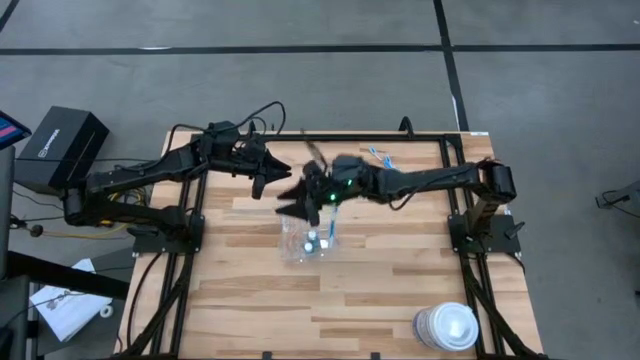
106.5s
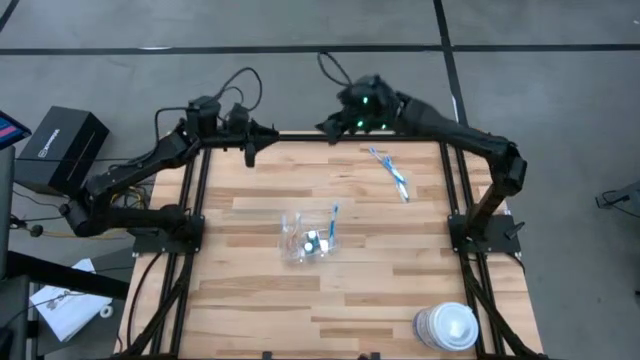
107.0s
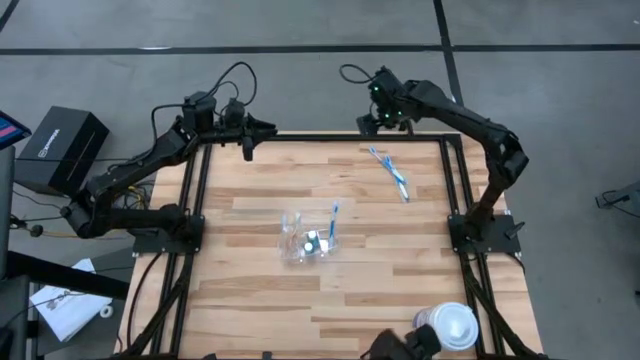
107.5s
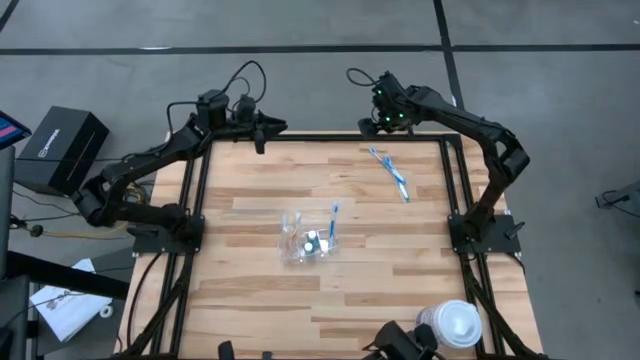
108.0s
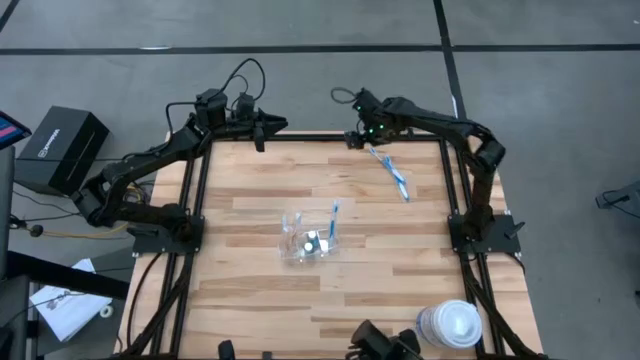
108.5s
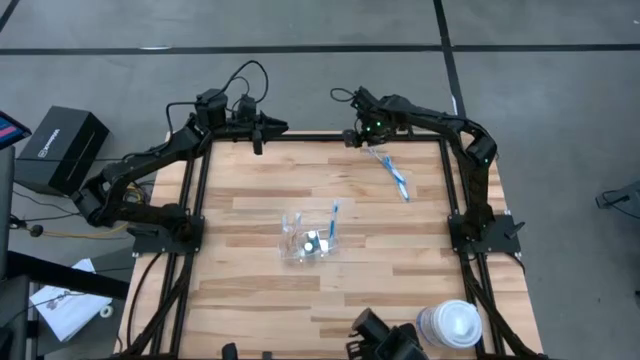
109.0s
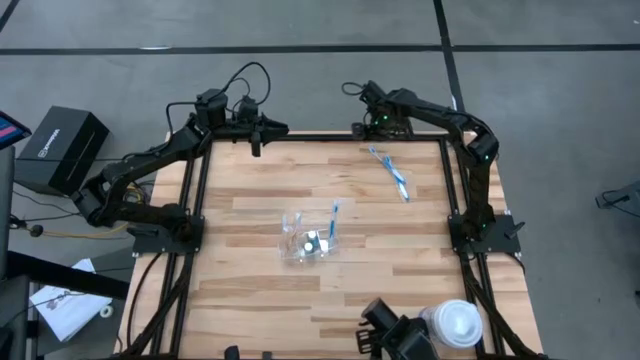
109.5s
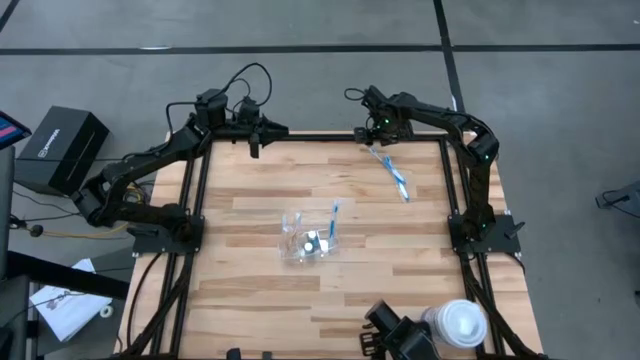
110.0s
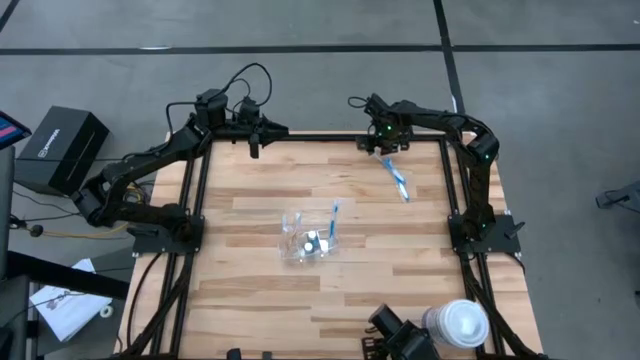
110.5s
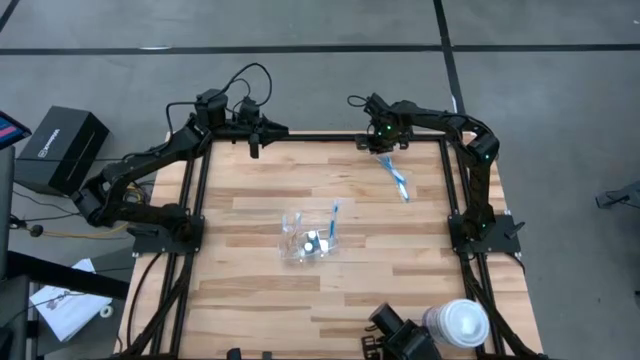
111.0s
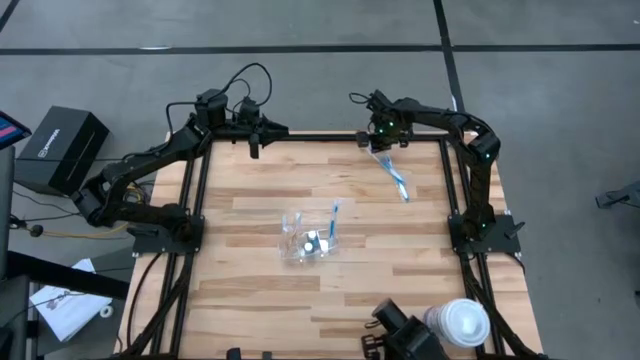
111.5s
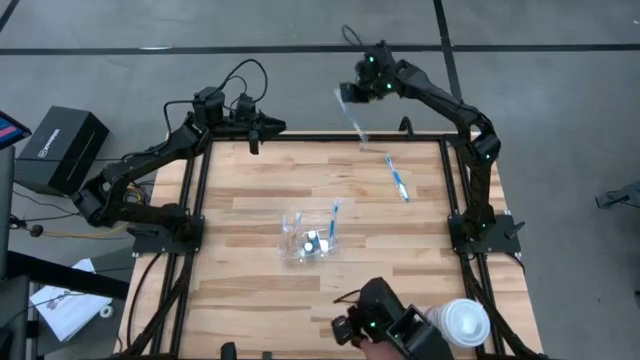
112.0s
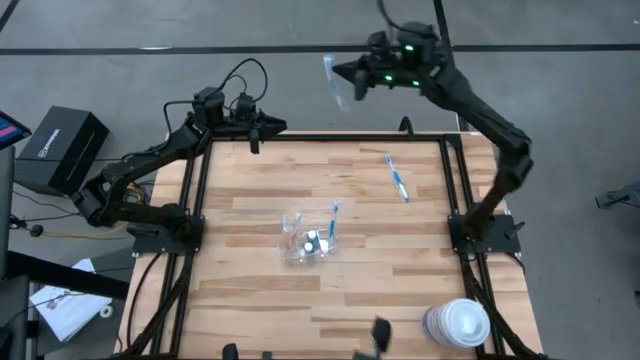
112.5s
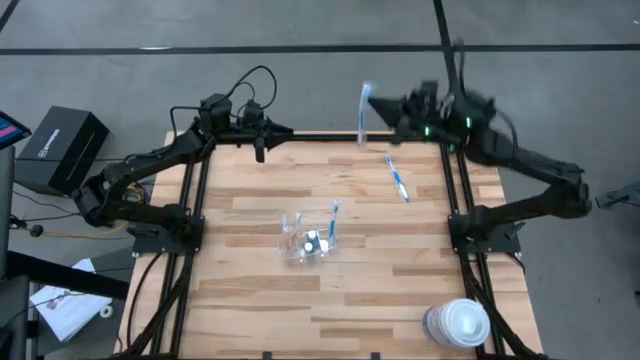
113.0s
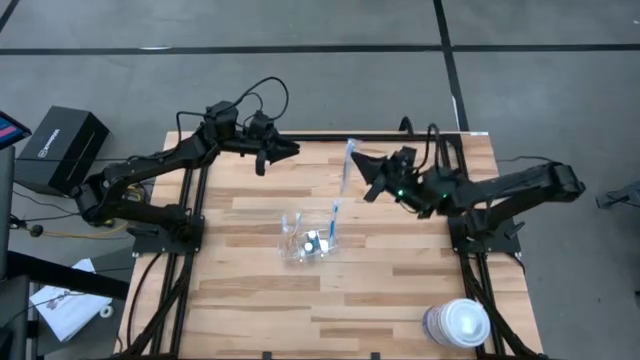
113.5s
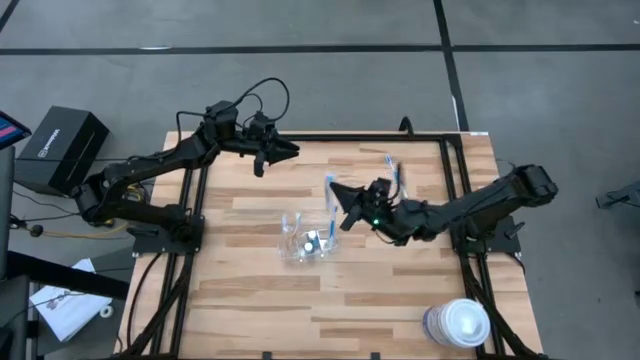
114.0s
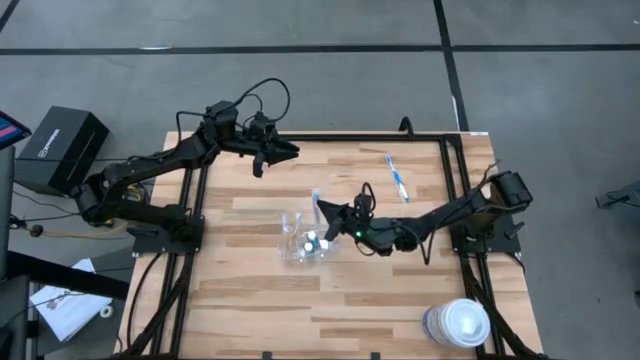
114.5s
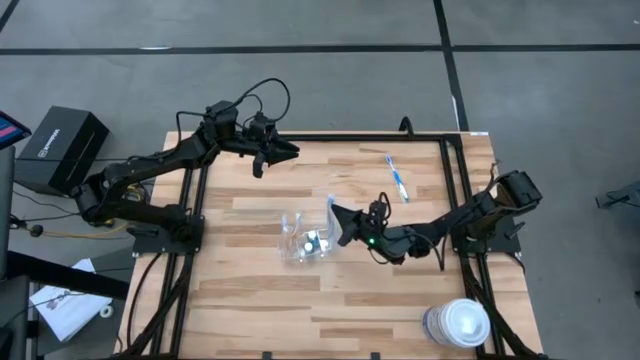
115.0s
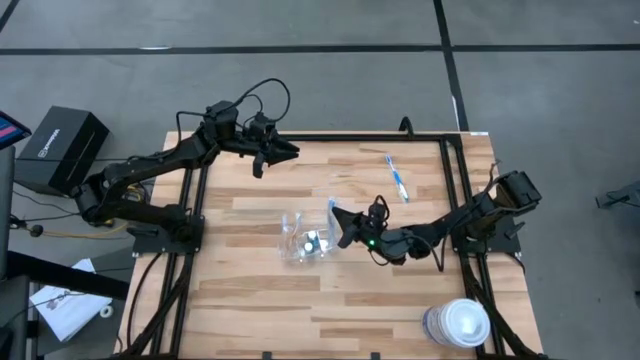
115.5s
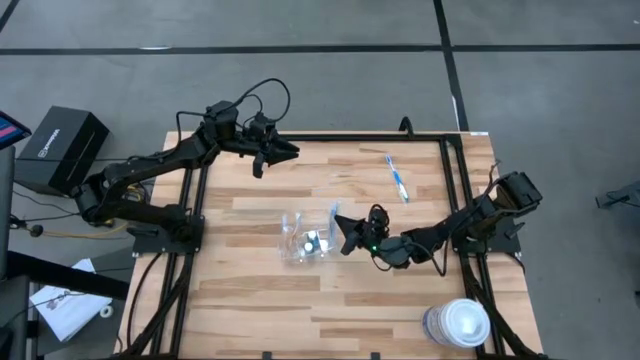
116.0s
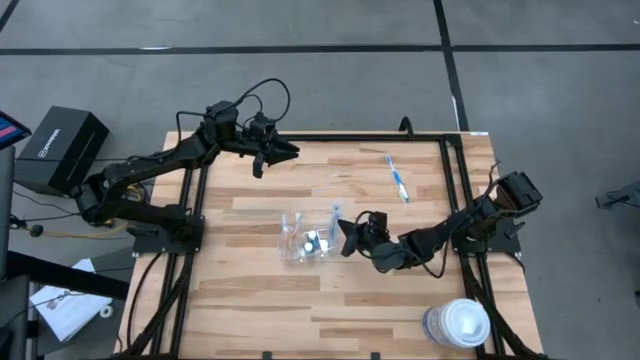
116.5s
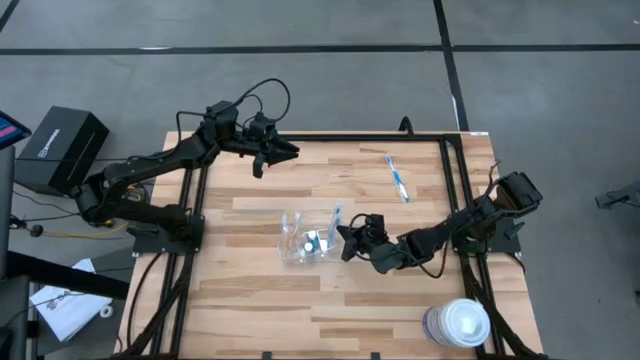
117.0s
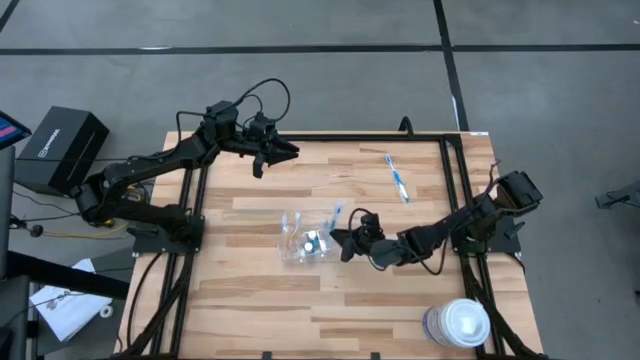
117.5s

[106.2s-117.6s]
Task: Pick & Place toothbrushing station
Put the left blue toothbrush into the transparent organizer

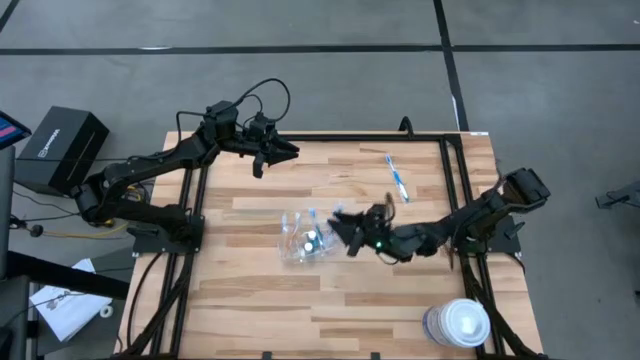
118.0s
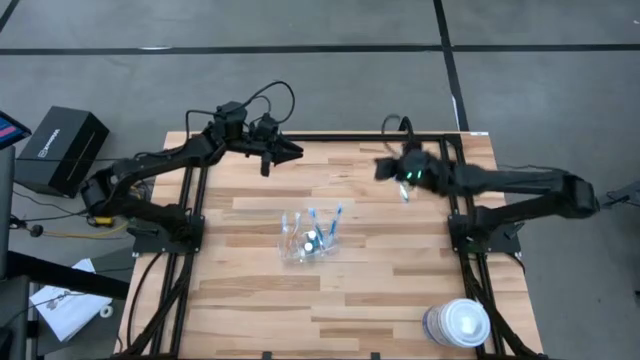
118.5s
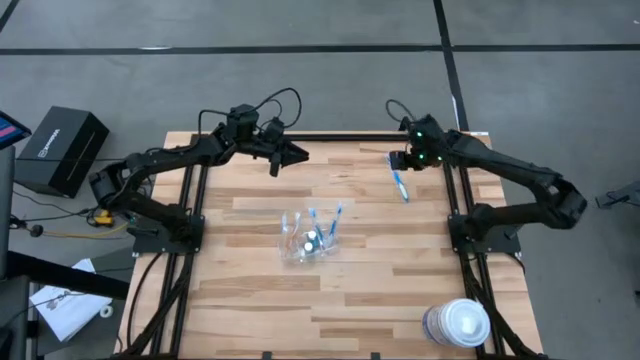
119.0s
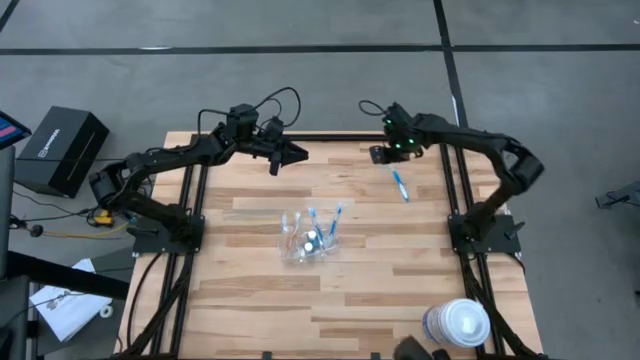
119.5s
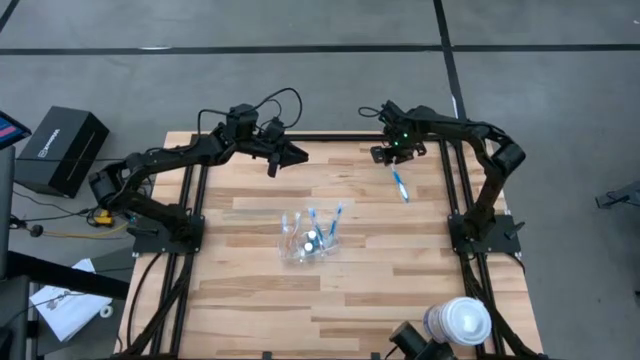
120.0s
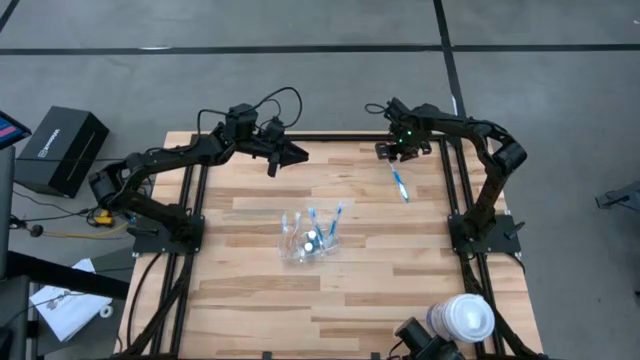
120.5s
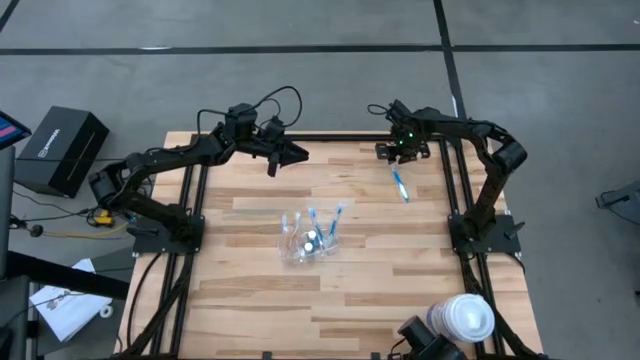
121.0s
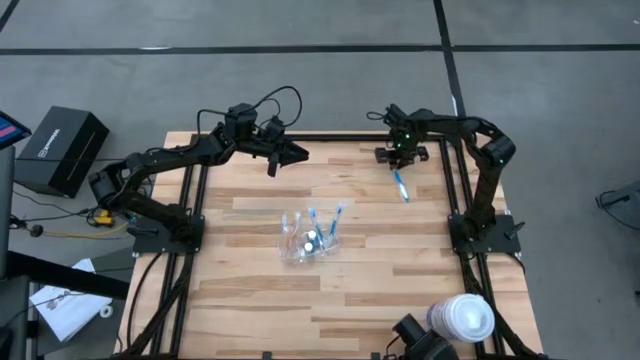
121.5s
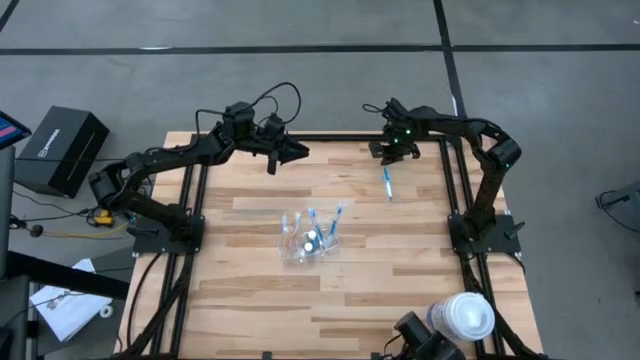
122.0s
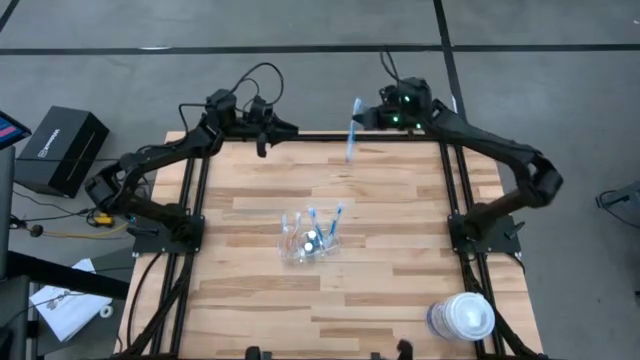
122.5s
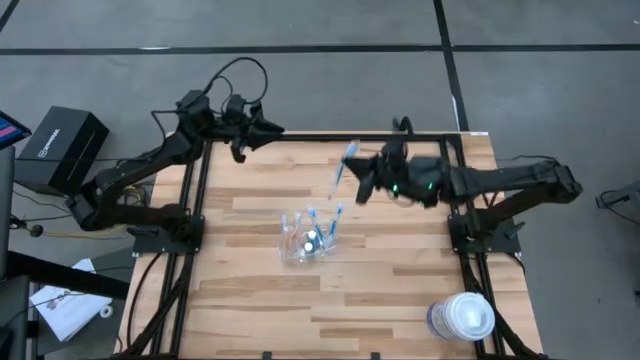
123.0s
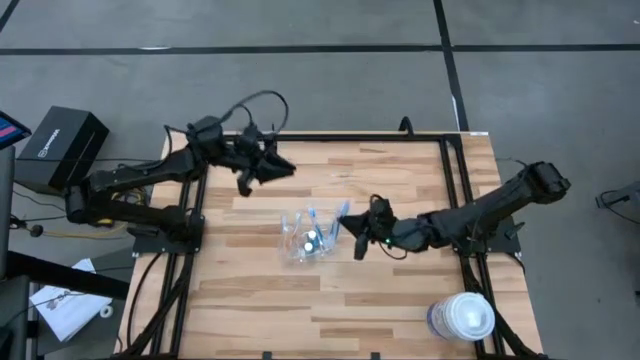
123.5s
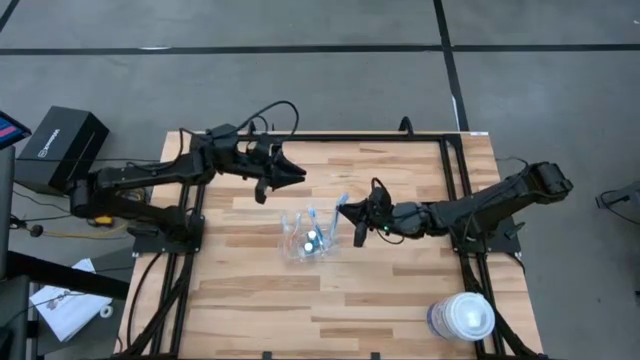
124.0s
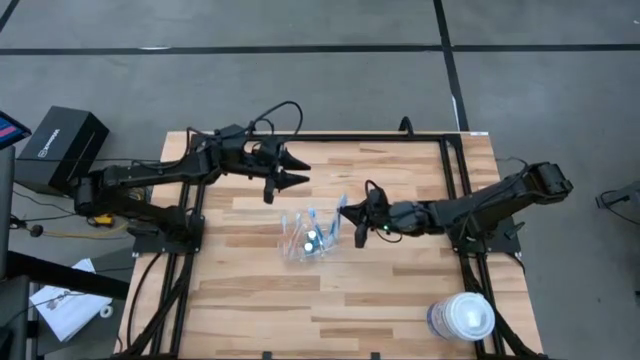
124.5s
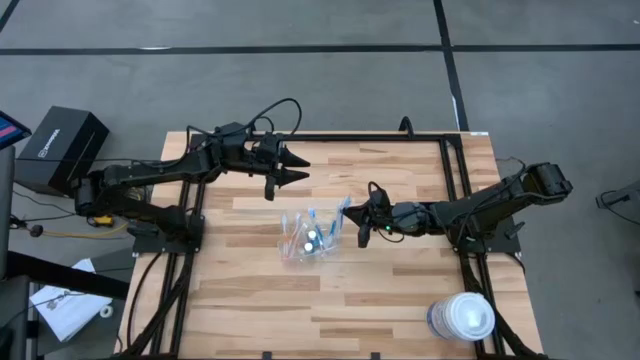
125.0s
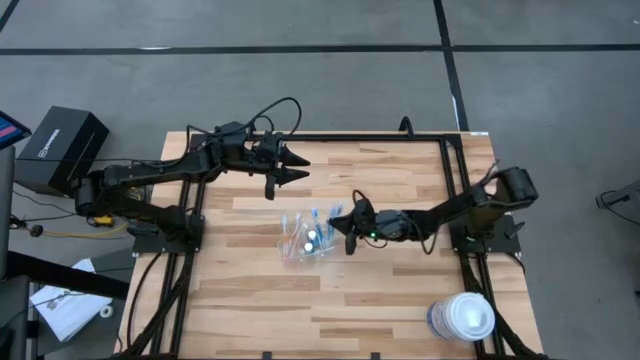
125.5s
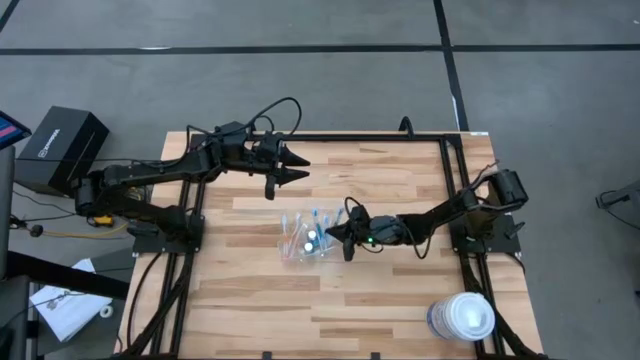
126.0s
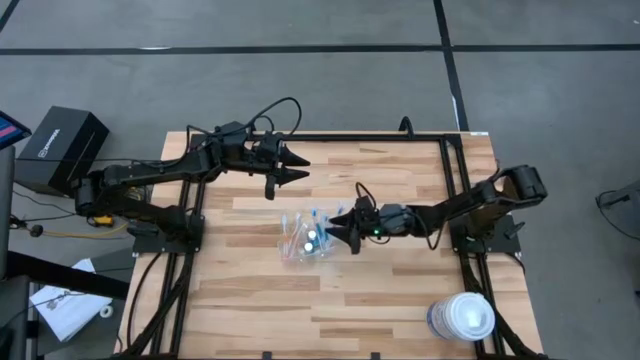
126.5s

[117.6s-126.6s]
Put the blue toothbrush into the transparent organizer

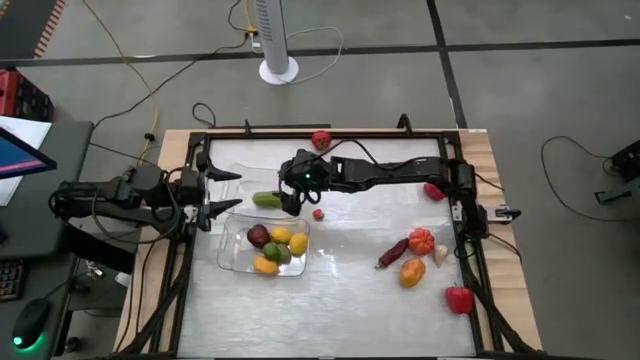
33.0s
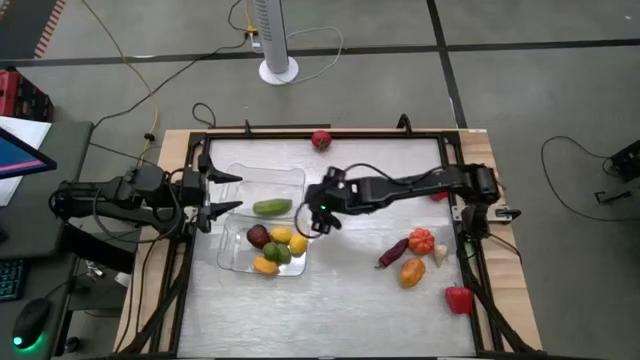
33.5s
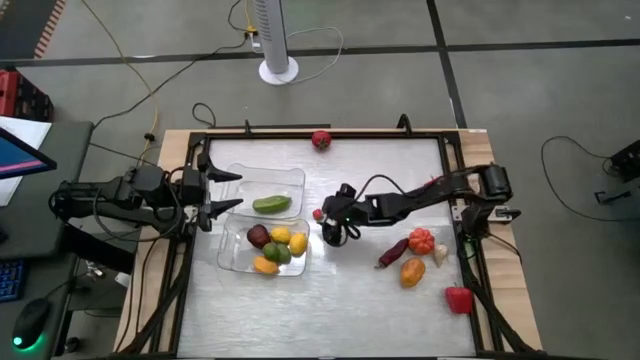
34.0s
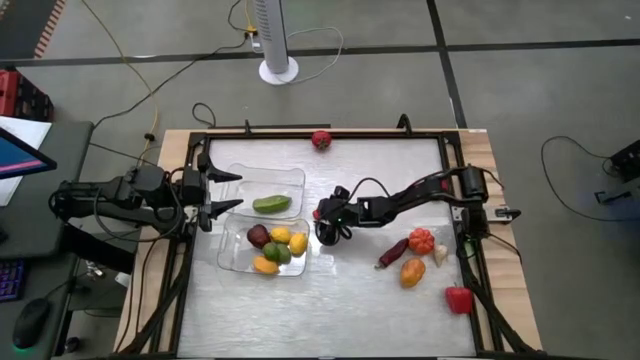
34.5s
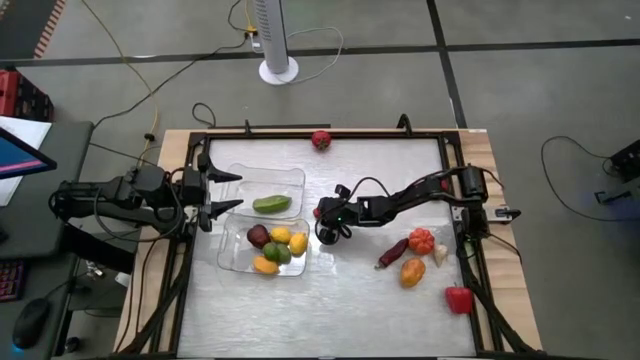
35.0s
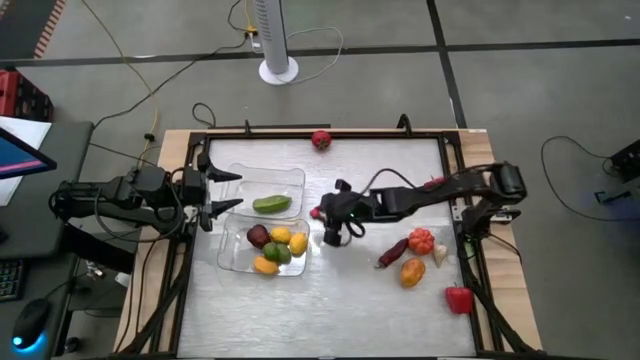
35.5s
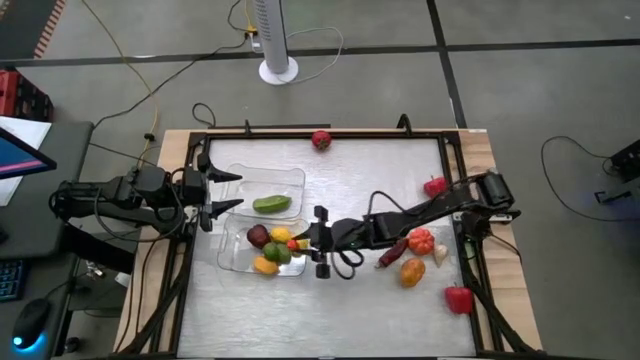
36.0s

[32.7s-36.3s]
Task: Sort produce into baskets
Put the red strawberry into the bottom transparent bin
